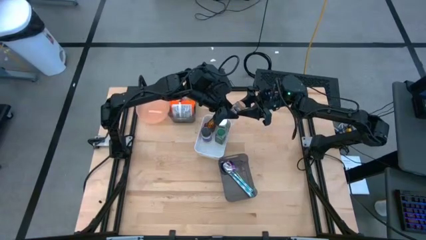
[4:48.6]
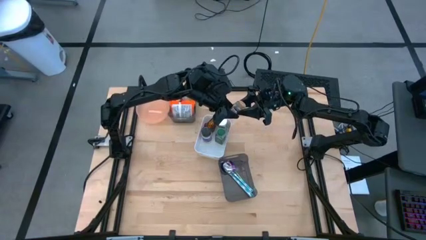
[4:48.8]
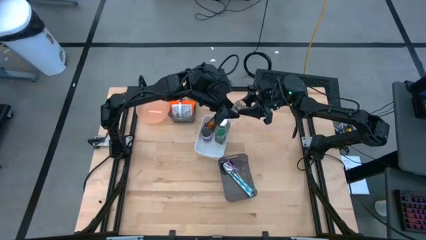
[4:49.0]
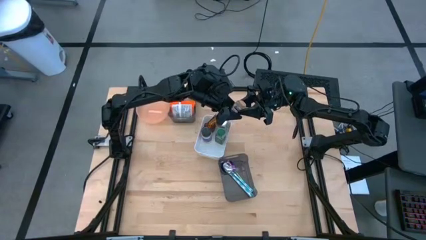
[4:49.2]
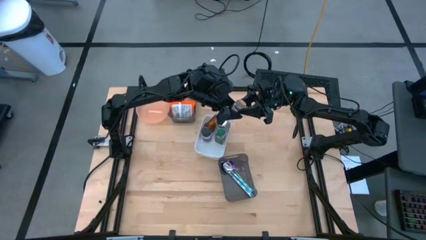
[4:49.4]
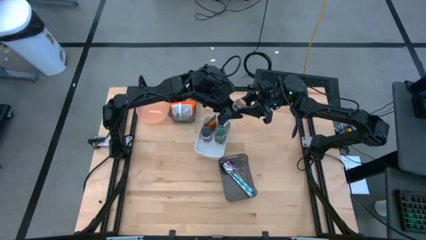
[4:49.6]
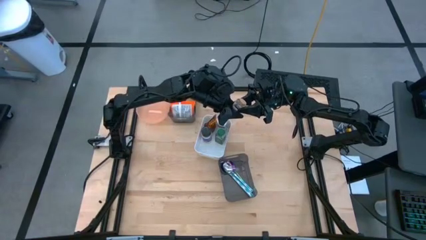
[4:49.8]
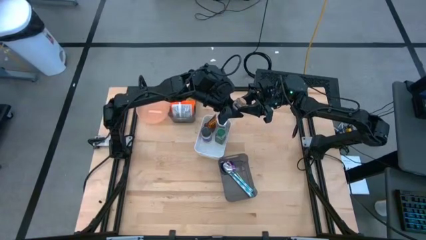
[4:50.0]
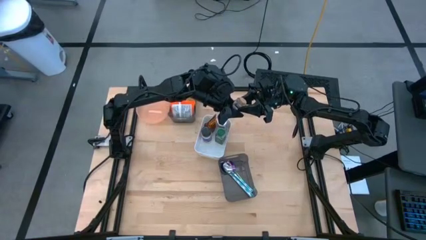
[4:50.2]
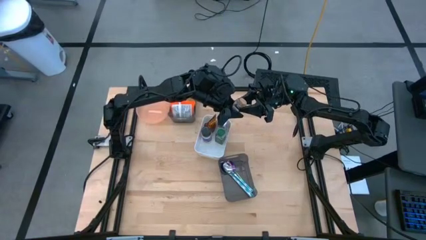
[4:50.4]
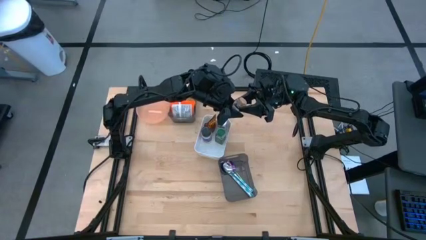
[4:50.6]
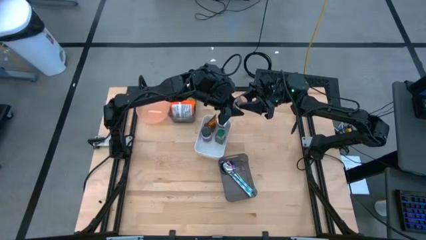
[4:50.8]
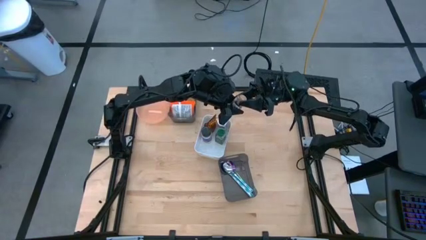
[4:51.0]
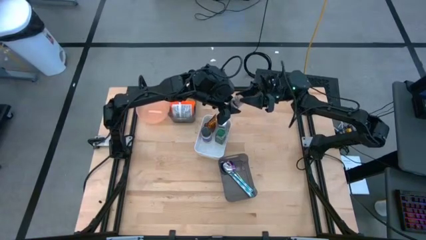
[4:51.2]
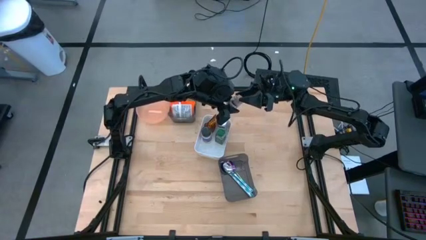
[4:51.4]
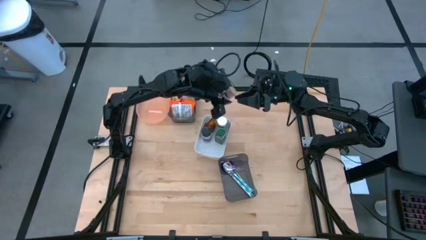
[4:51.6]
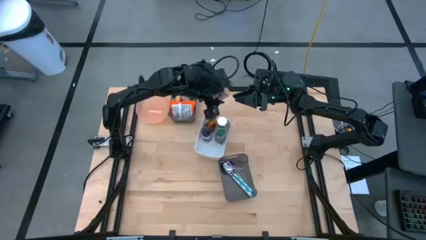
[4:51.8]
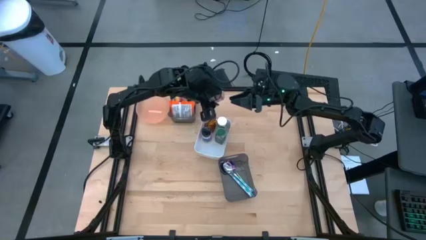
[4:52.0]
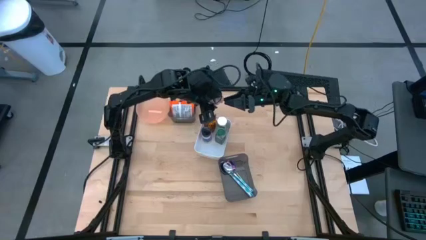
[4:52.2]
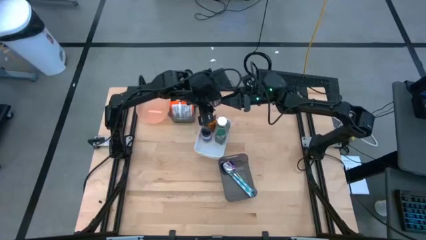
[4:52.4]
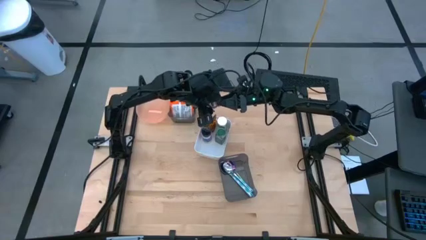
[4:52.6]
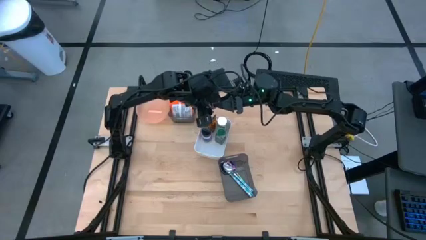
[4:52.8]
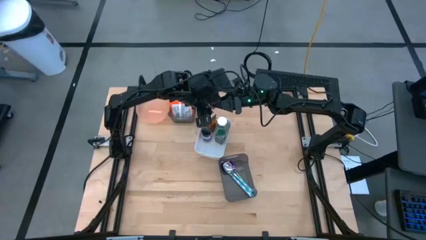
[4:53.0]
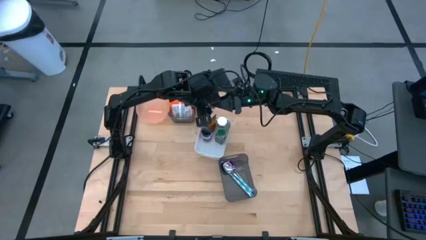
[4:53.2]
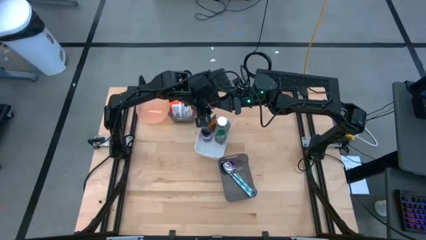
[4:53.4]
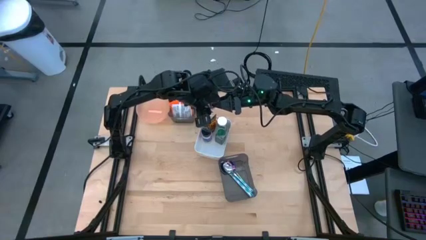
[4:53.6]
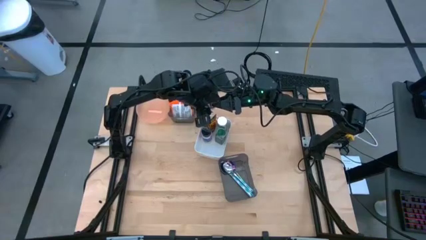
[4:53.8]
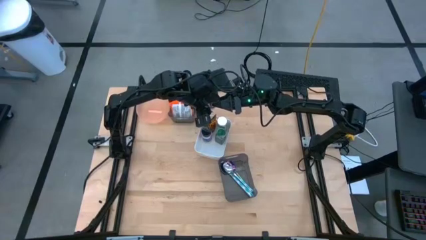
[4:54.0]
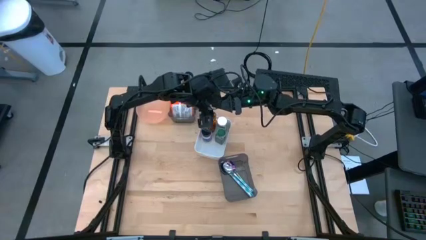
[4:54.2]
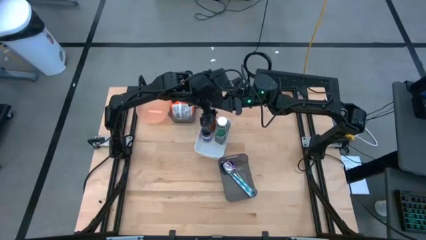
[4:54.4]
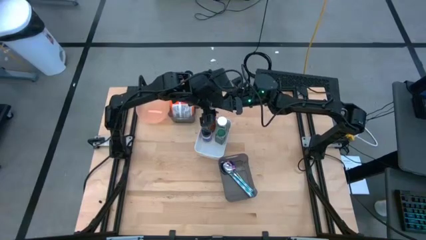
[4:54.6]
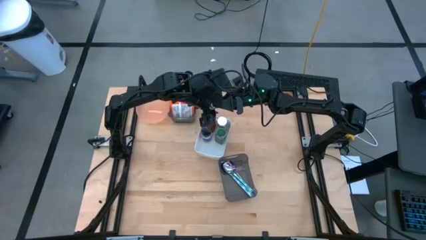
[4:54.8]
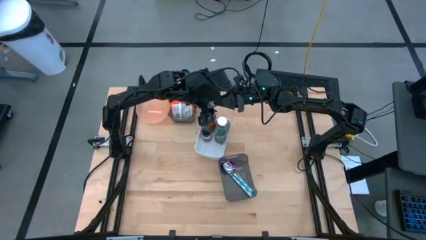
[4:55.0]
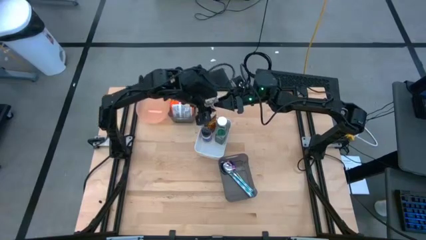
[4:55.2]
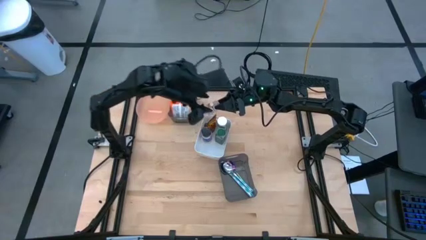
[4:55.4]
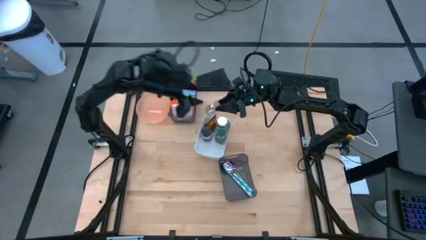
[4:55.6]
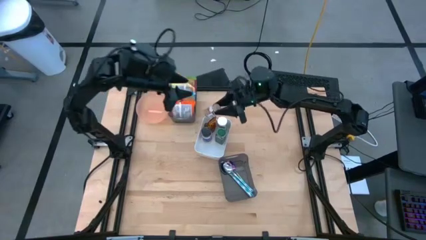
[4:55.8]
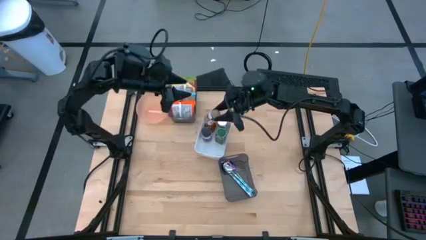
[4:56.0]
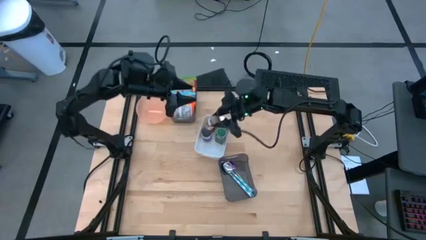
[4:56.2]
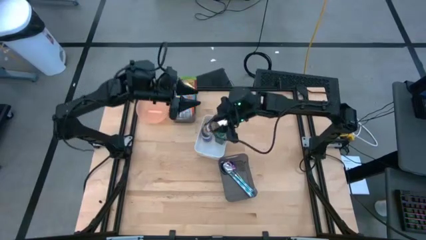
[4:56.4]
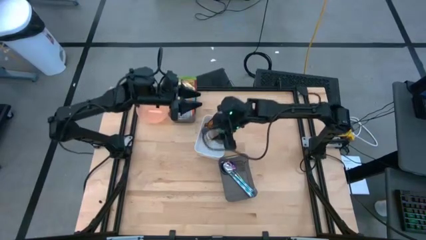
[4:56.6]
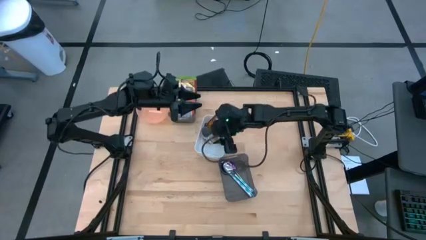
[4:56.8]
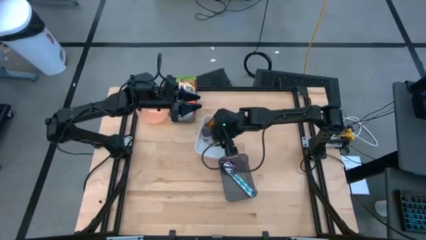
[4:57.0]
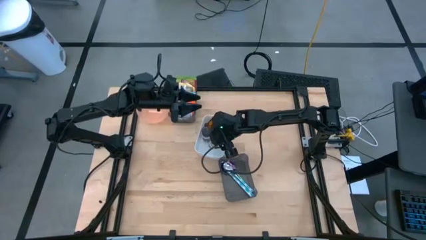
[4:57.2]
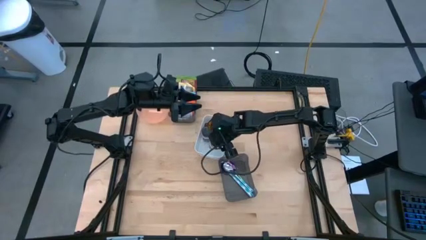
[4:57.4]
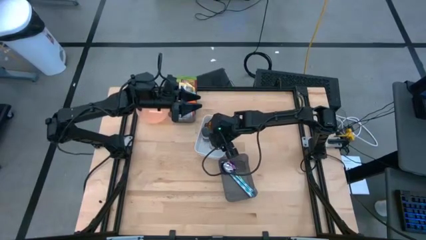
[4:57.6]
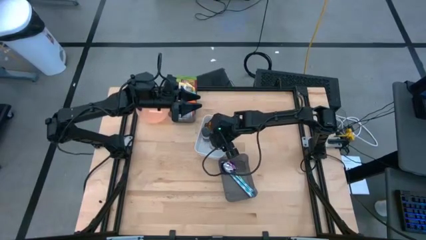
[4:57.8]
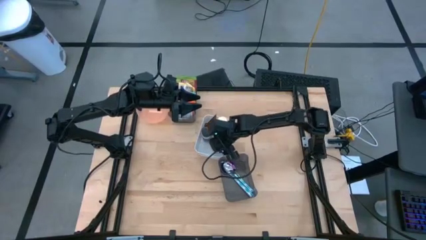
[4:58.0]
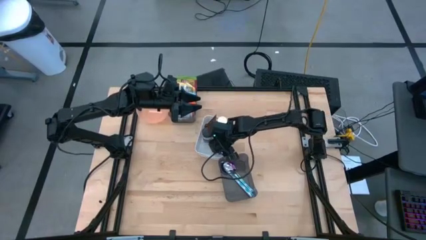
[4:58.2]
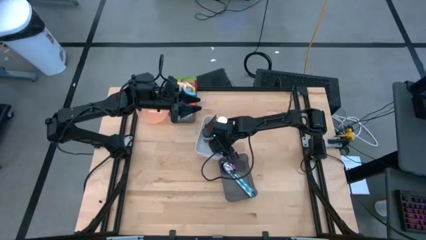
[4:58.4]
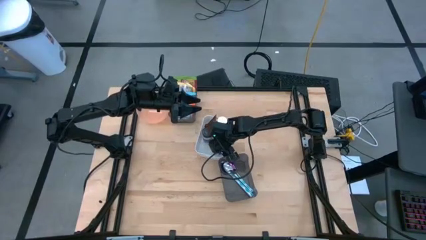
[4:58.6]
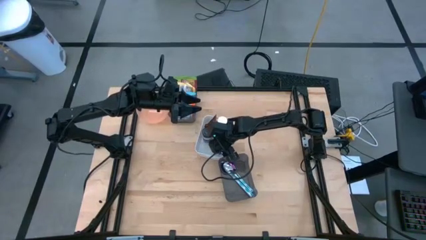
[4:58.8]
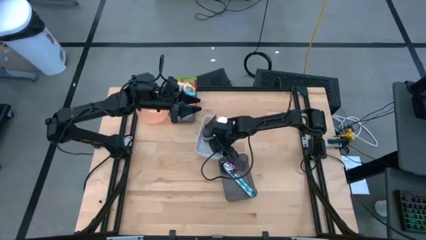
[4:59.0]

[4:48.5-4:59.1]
Task: Pick & Place Food Item
Put the brown seasoning bottle into the white bin

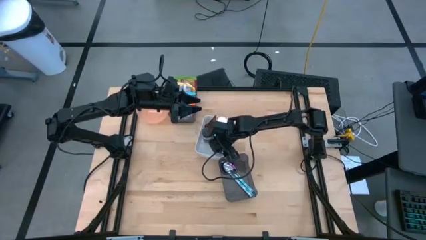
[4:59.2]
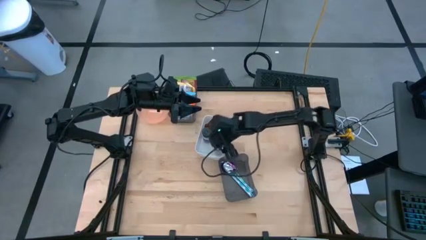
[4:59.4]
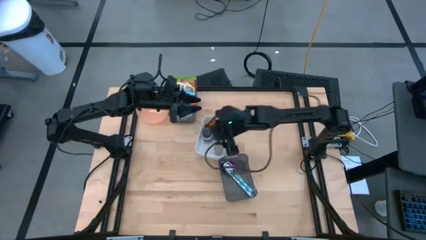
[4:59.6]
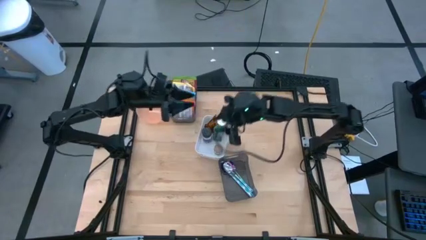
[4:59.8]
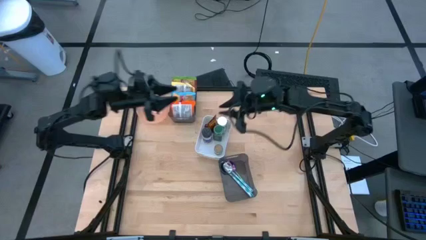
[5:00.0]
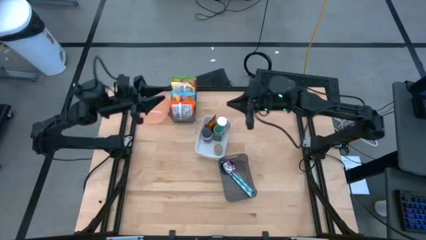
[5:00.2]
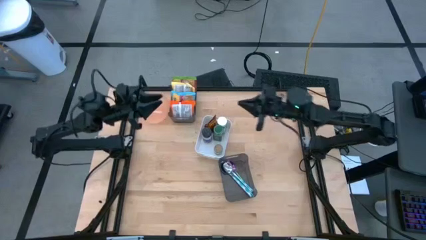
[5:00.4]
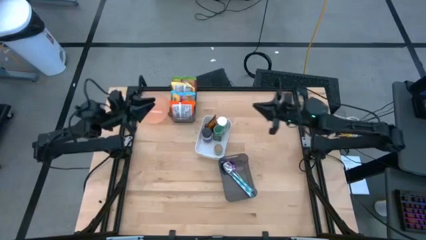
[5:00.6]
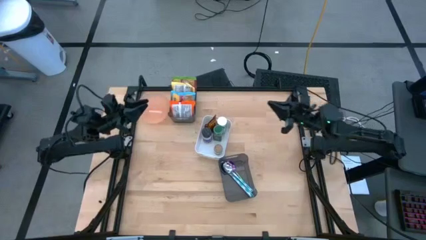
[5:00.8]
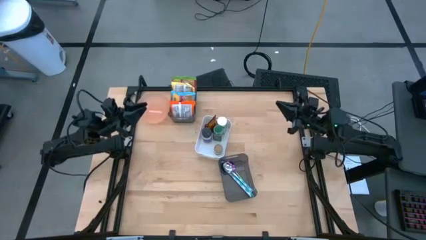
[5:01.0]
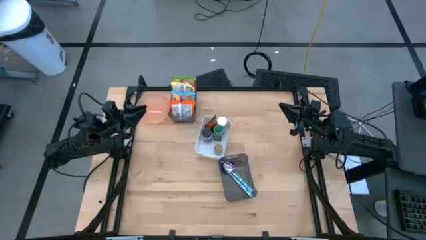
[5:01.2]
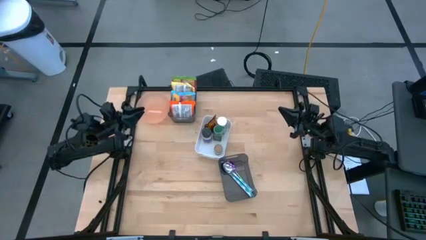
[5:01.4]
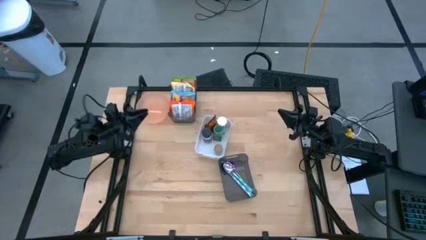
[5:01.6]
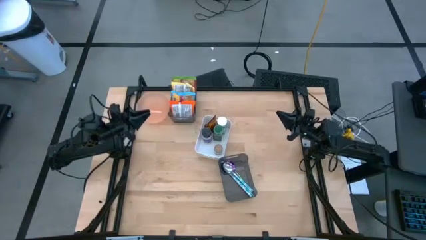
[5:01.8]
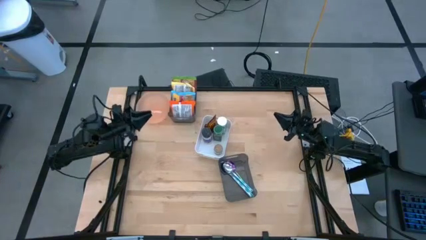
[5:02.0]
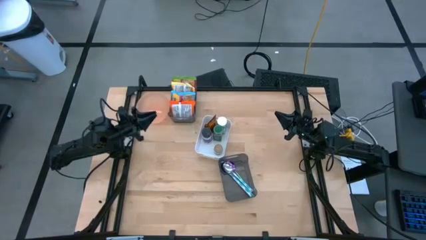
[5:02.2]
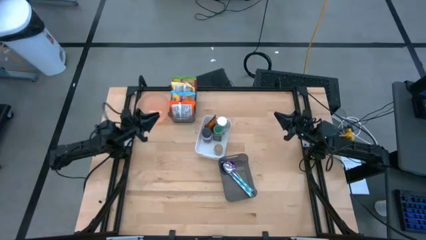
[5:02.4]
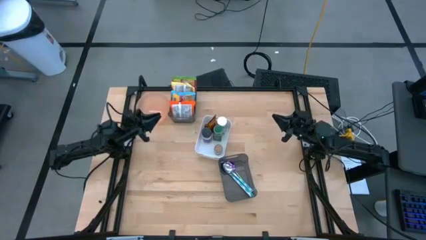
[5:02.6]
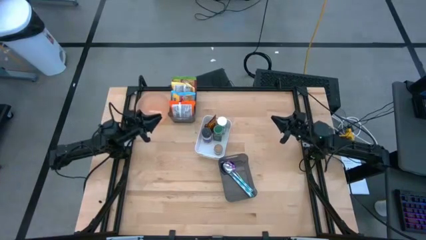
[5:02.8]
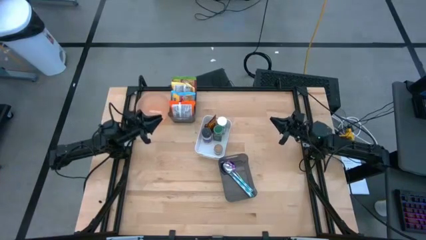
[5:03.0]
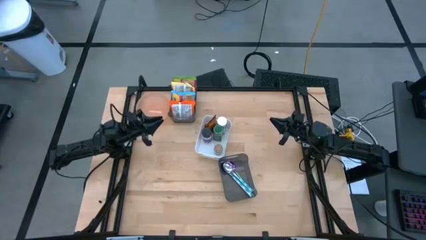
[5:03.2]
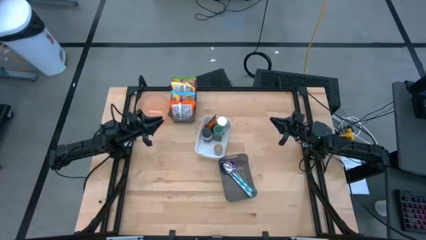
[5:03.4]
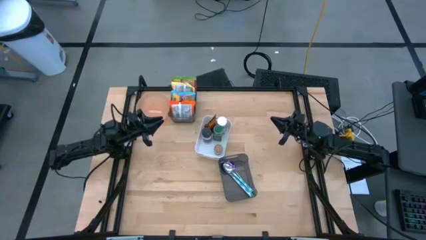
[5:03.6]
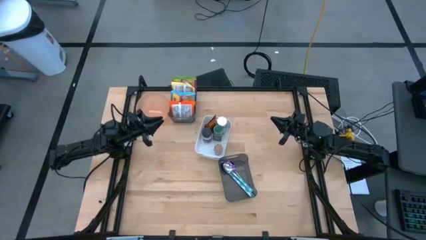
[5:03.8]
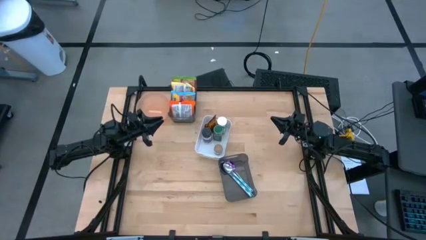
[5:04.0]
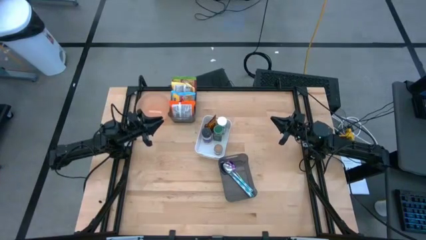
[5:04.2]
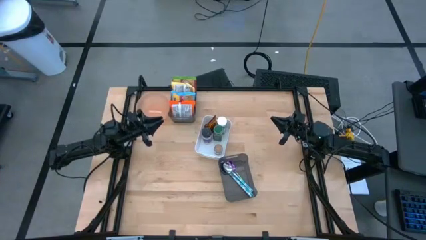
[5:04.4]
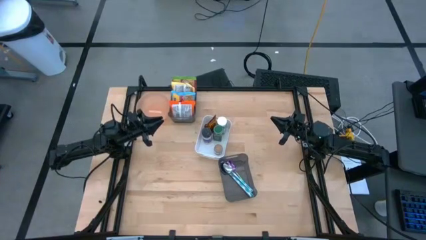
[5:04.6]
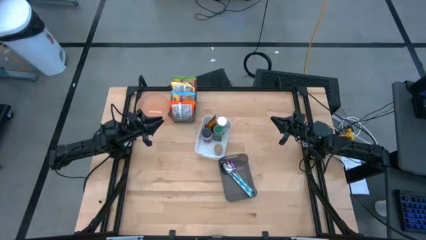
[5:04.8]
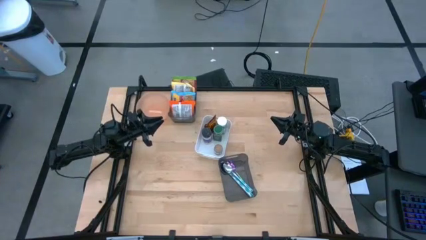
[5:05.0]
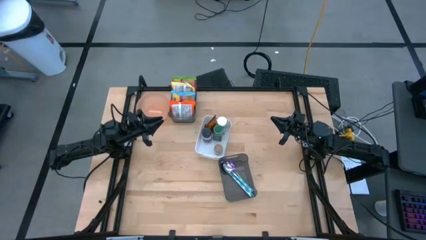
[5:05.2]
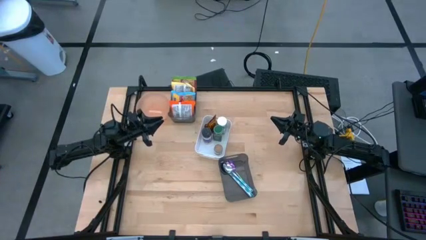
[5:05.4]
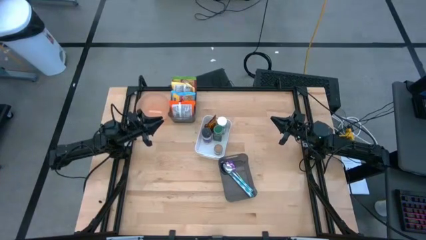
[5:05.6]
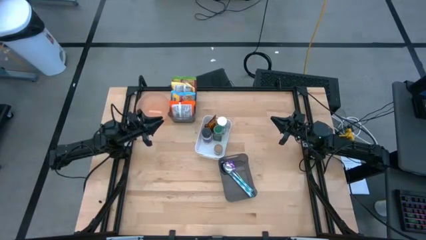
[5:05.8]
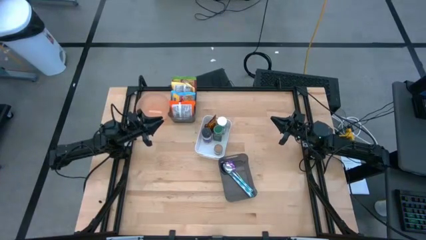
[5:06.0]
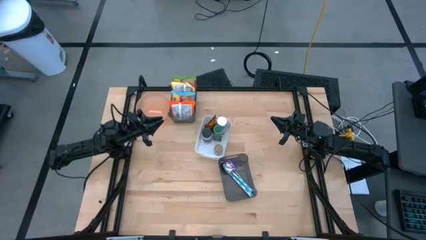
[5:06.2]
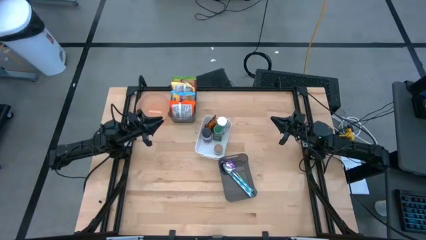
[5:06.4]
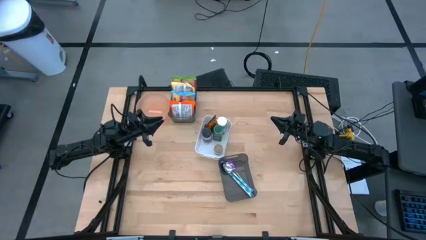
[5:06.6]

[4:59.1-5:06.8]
Return to Home Position
